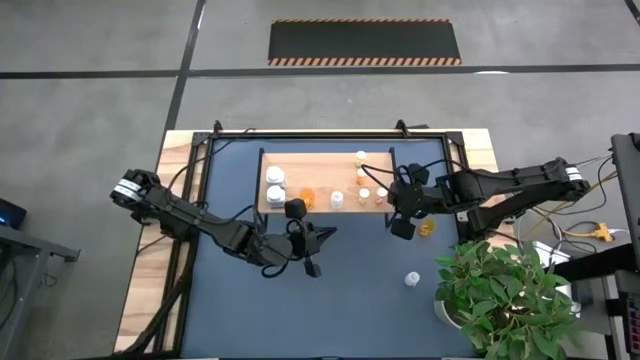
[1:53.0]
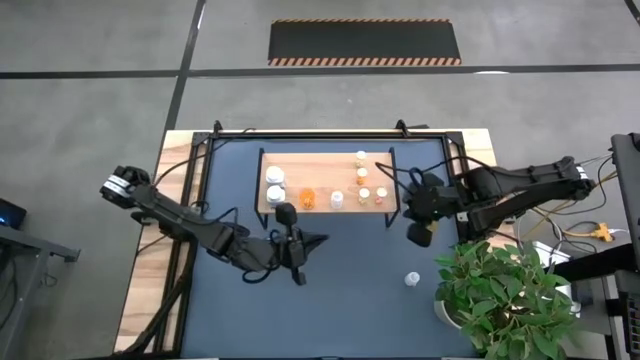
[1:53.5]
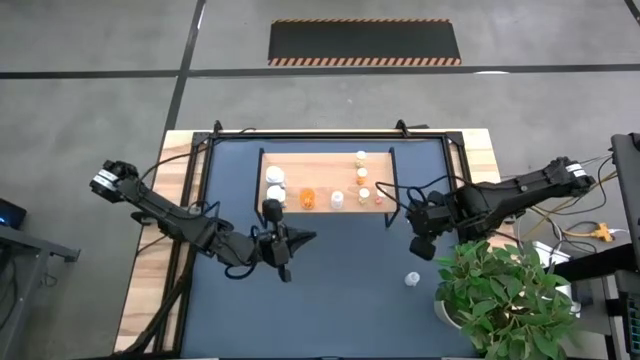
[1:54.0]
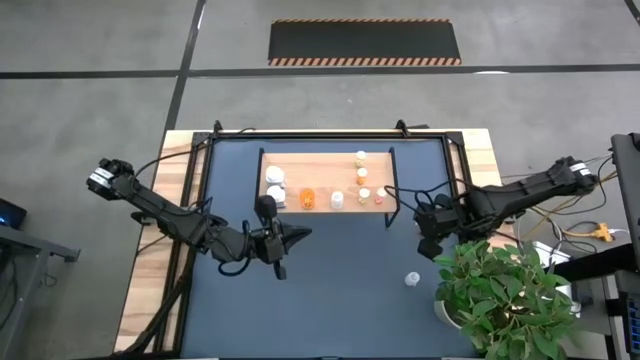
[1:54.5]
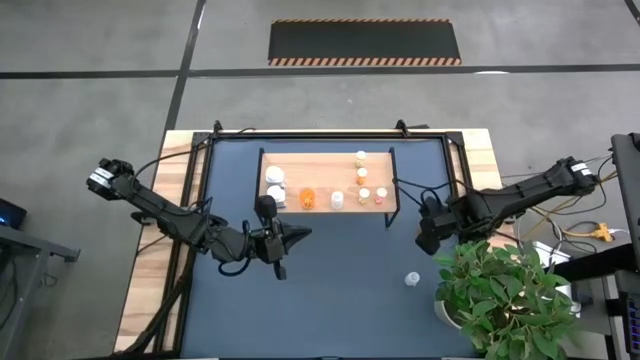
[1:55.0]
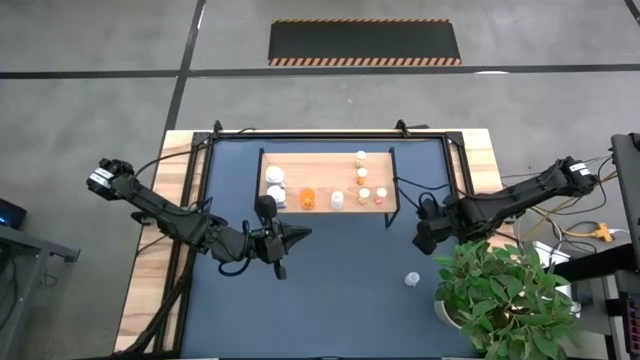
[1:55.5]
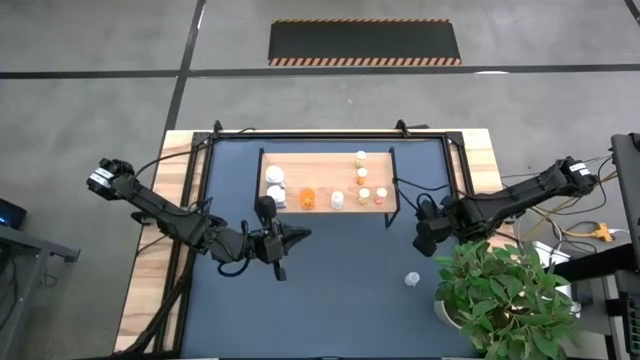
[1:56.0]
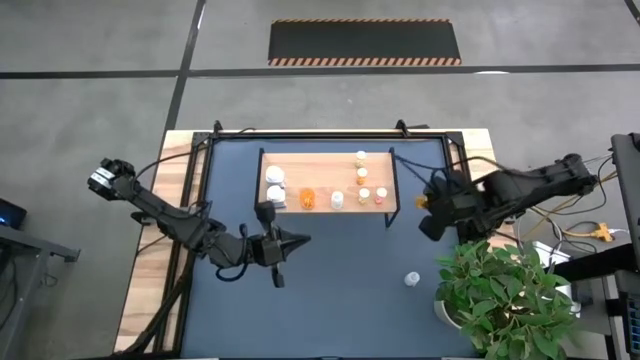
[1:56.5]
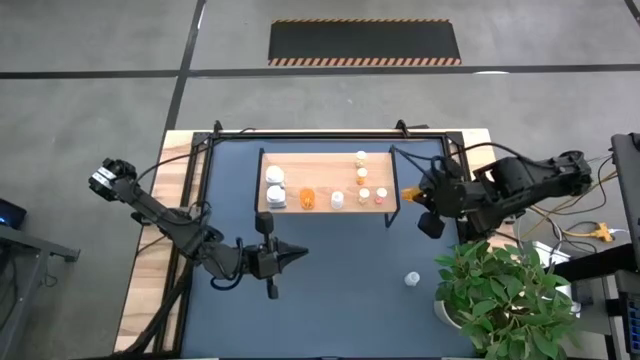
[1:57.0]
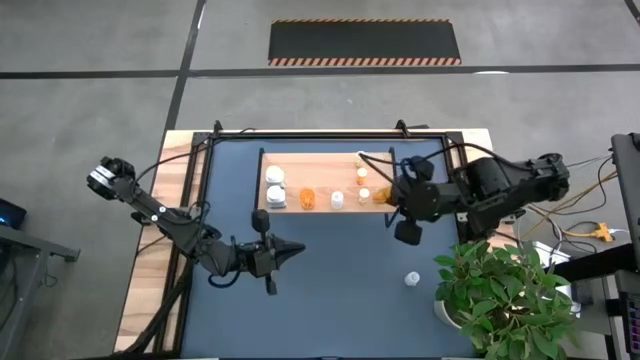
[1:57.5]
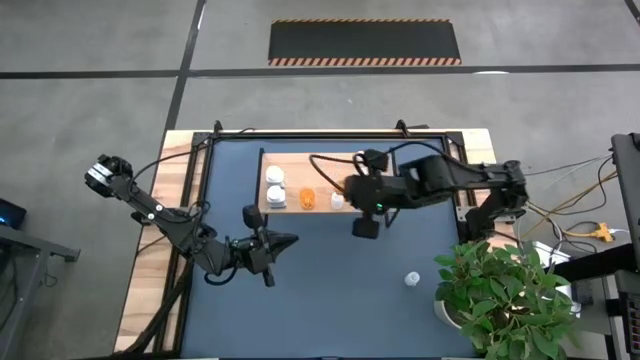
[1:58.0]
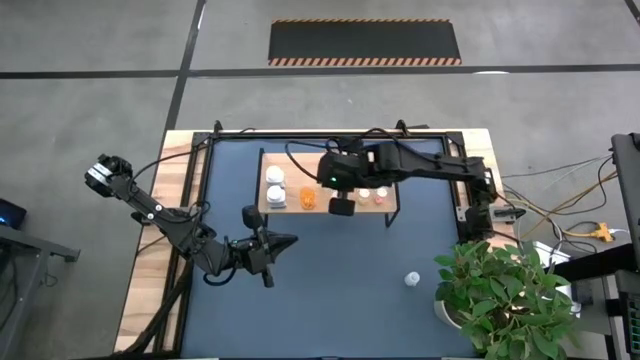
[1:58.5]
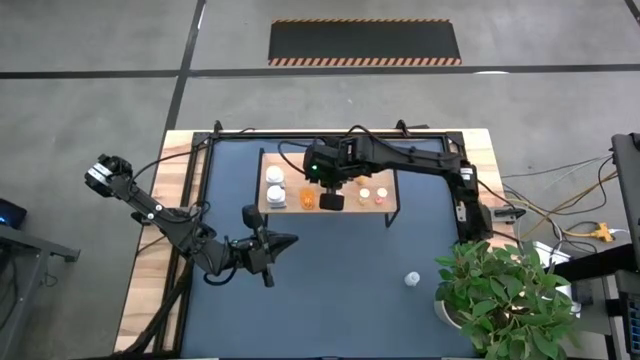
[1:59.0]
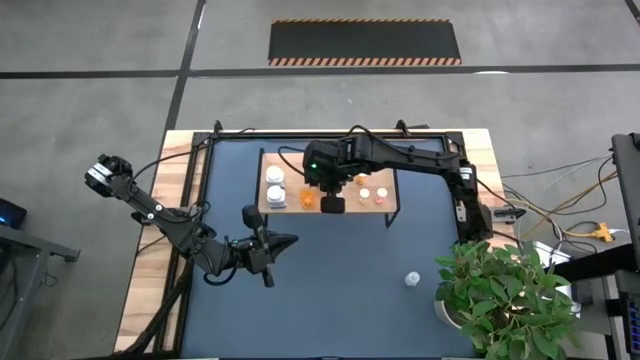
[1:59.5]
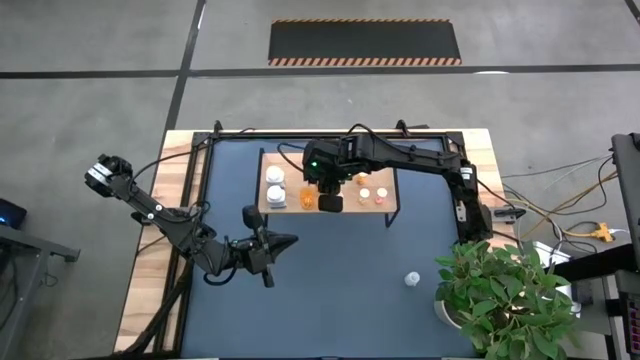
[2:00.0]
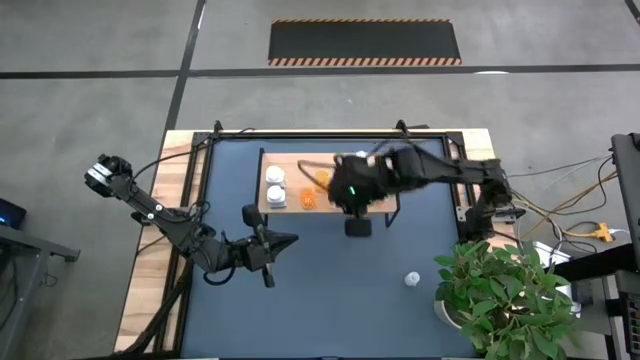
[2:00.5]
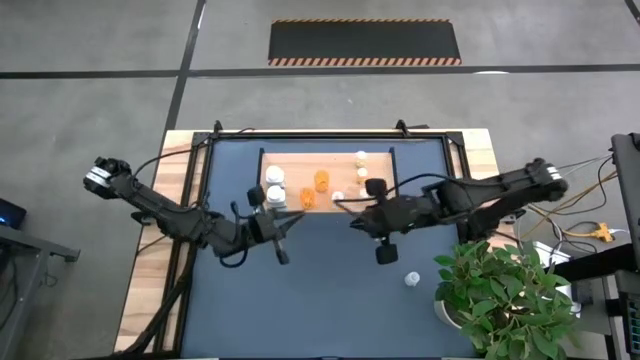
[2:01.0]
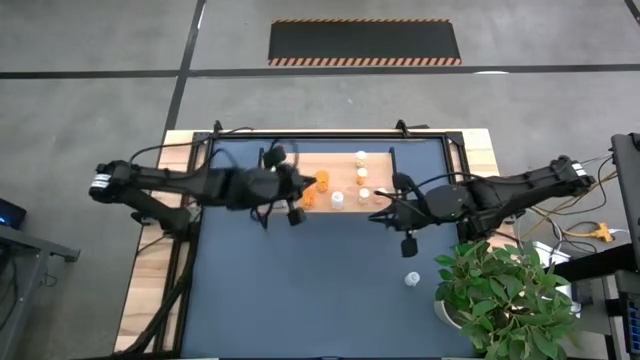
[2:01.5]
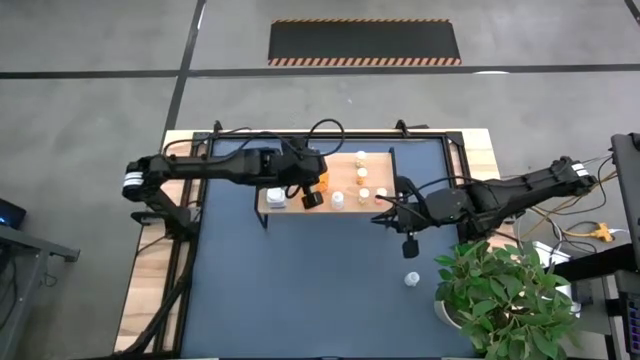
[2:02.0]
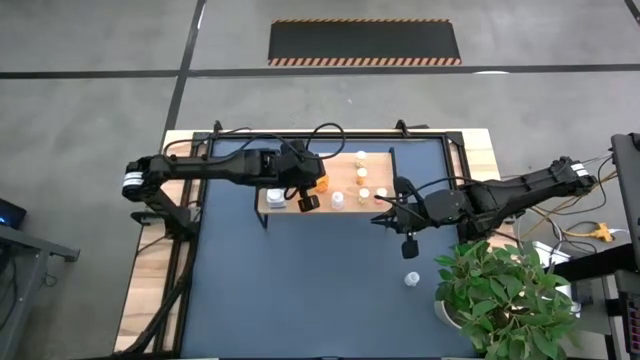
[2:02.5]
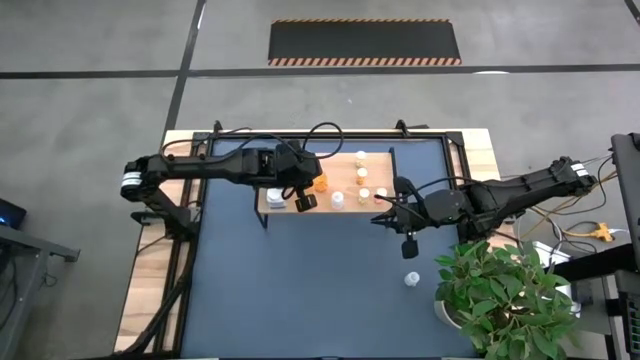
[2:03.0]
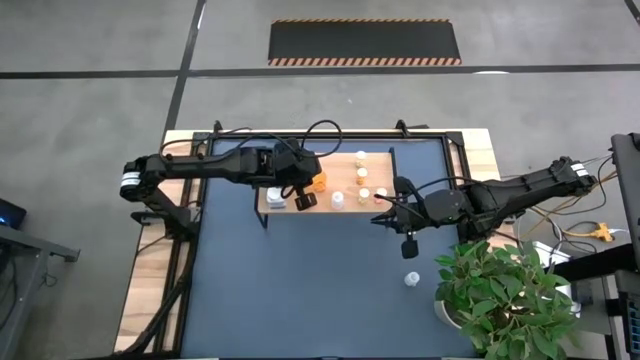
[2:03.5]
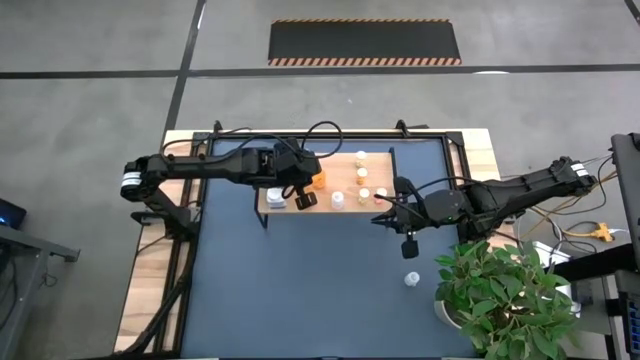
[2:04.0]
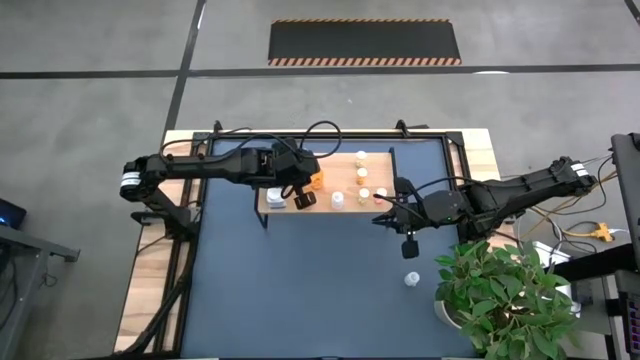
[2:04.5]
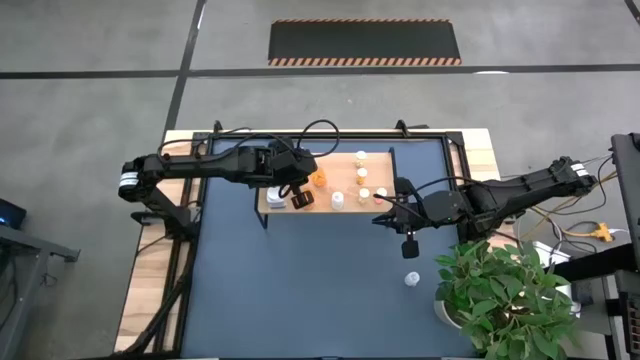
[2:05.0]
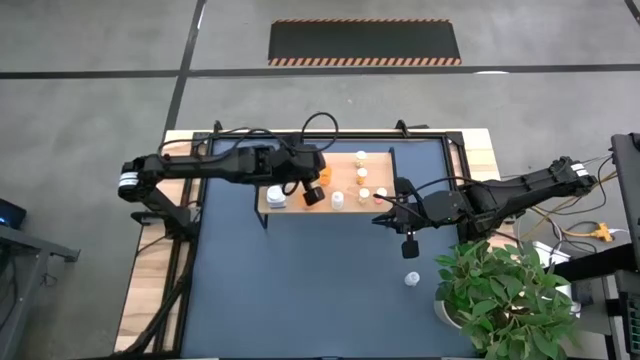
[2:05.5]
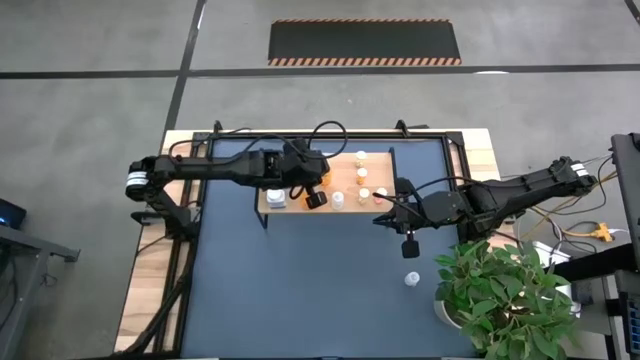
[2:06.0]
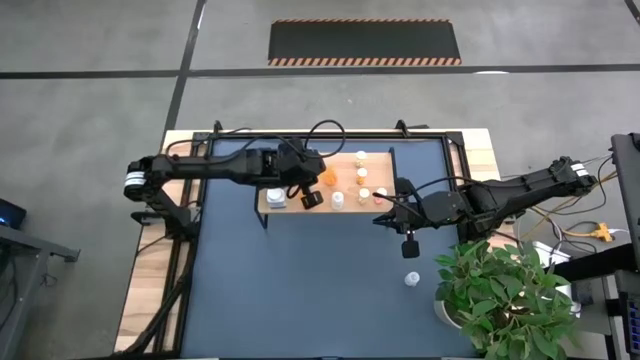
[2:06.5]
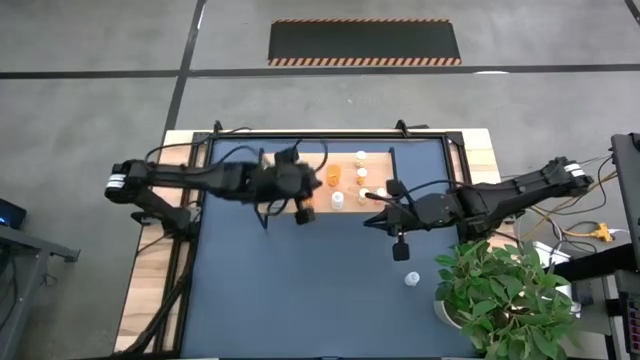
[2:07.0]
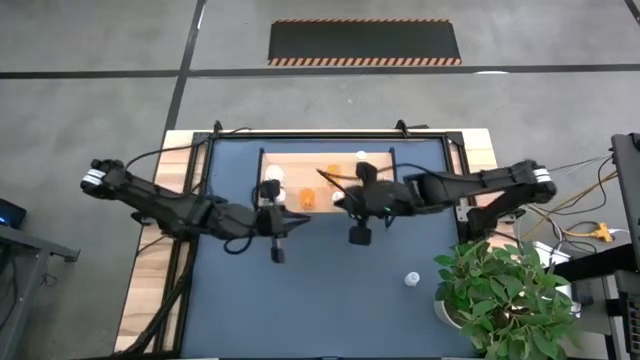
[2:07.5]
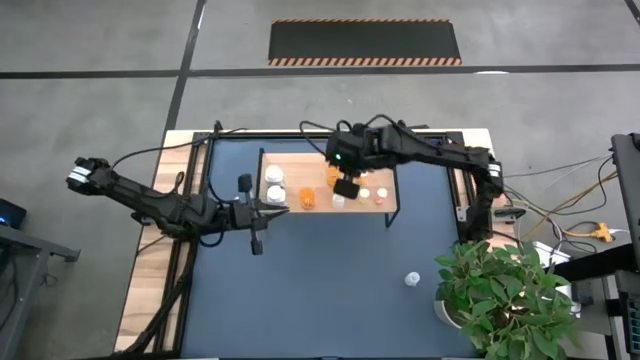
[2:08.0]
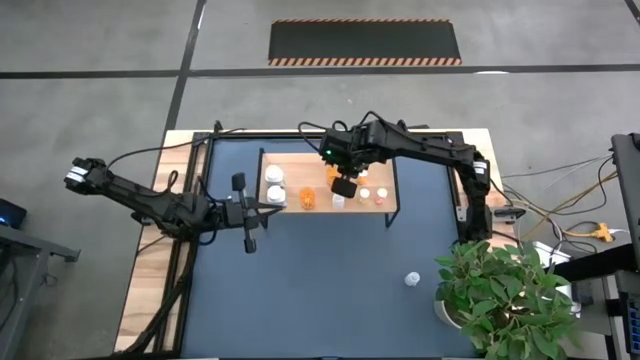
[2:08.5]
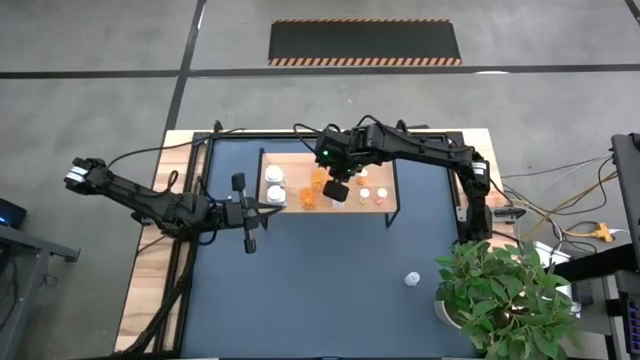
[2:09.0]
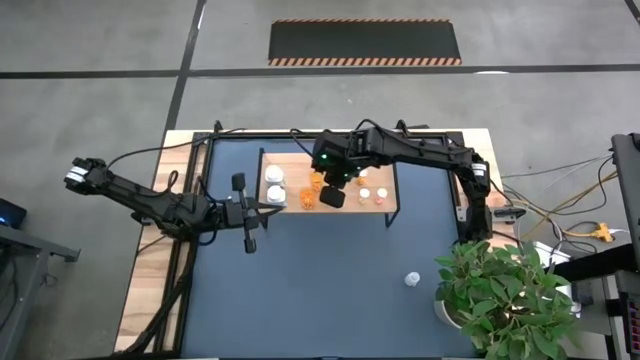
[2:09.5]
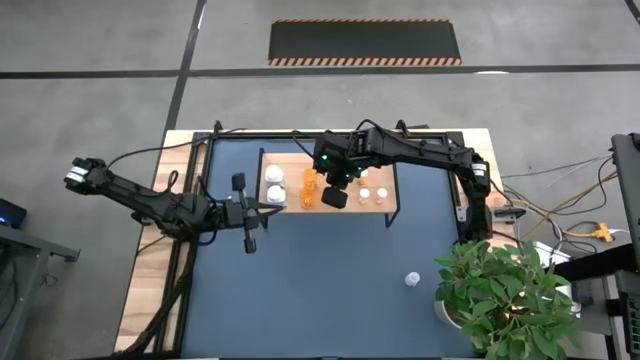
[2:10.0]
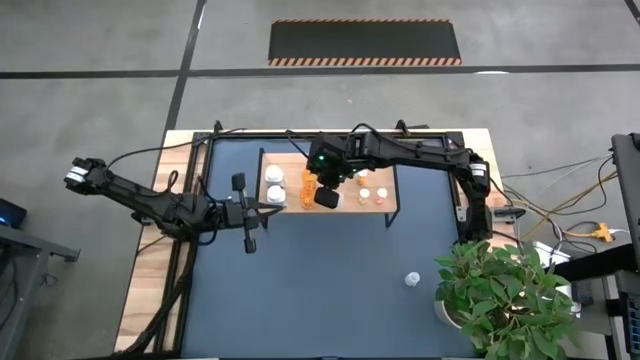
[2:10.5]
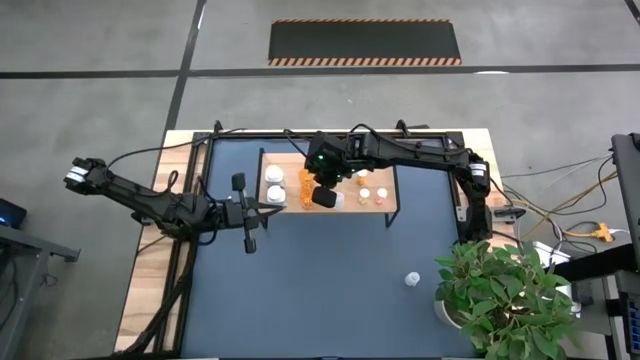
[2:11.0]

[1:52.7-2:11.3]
Task: Pick and place medicine bottles onto shelf by color
Put the large orange bottle on the shelf

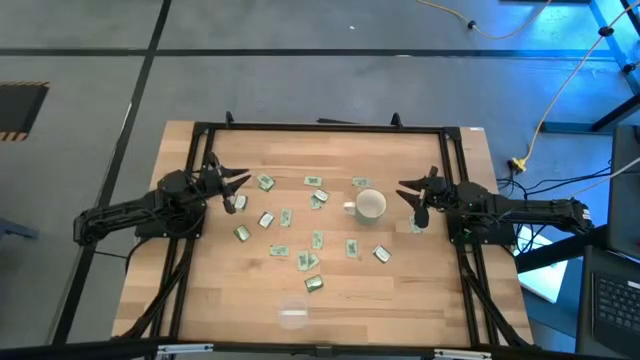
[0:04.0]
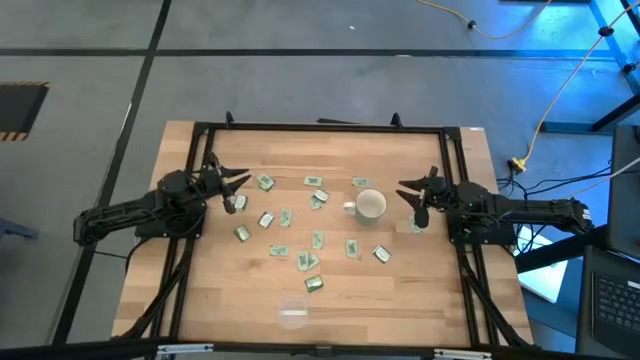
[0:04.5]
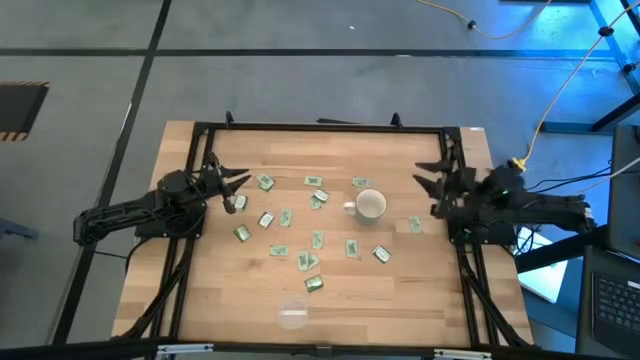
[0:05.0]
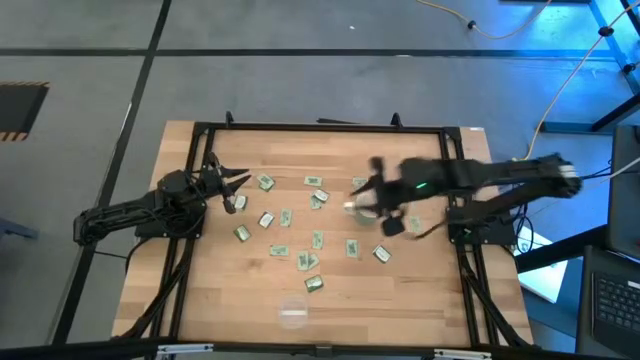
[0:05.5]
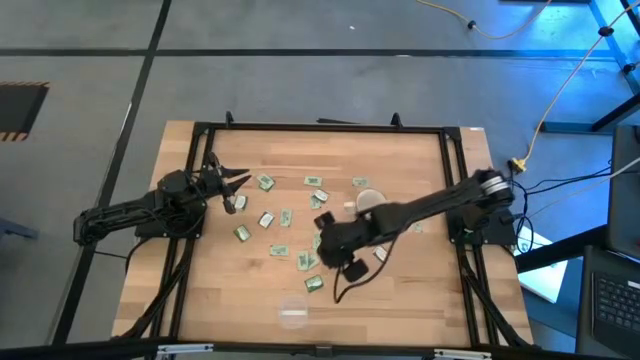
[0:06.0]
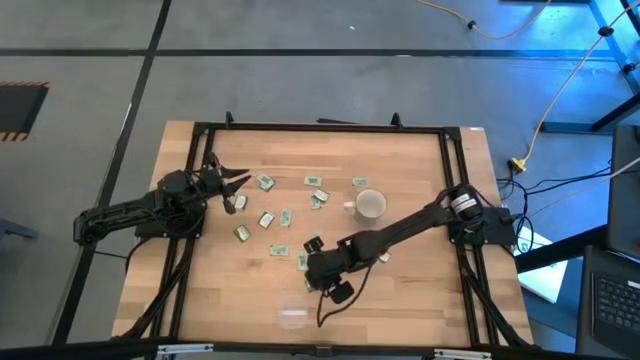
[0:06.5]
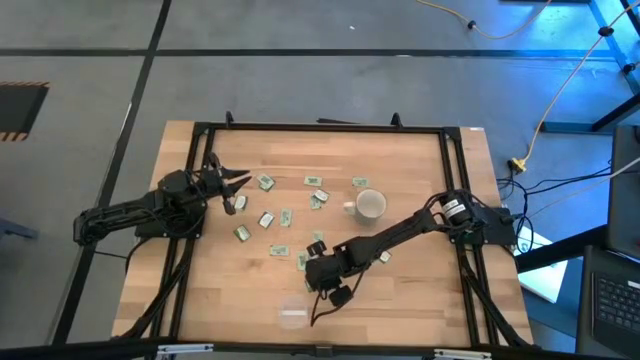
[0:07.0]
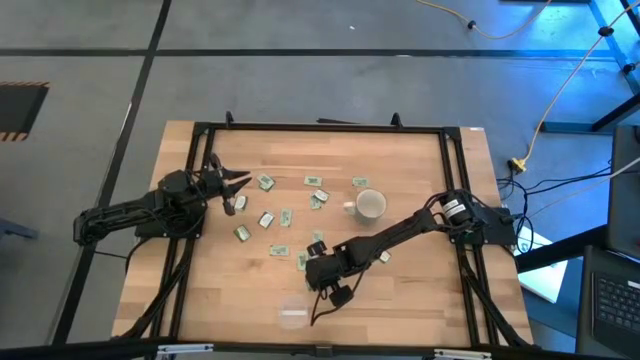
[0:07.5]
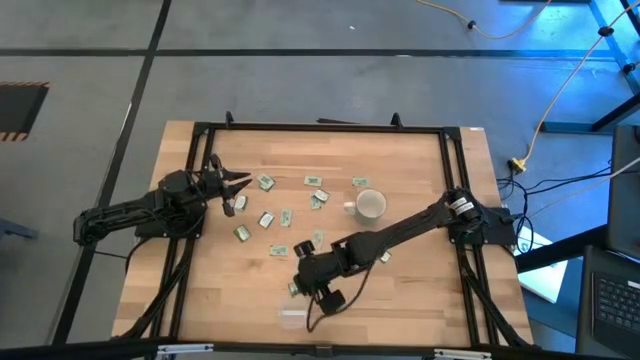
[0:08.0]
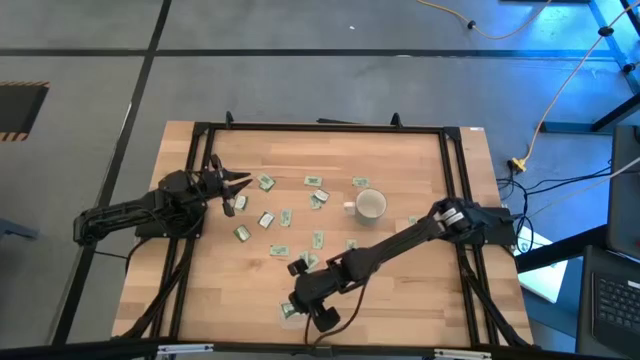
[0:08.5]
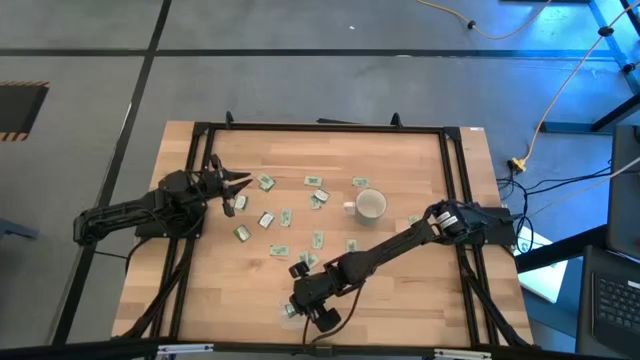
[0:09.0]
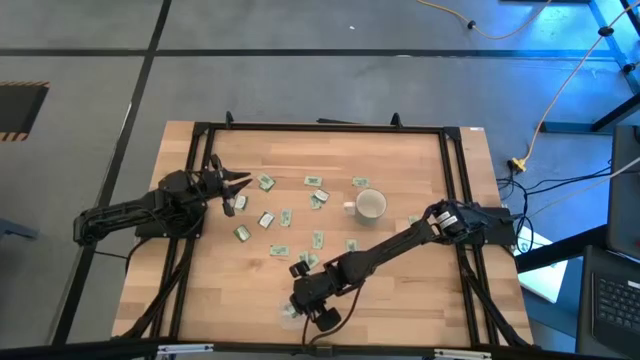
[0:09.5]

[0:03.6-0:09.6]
Task: Pick and place Stevia / Truvia into bins
Put the green stevia packet into the transparent bin
